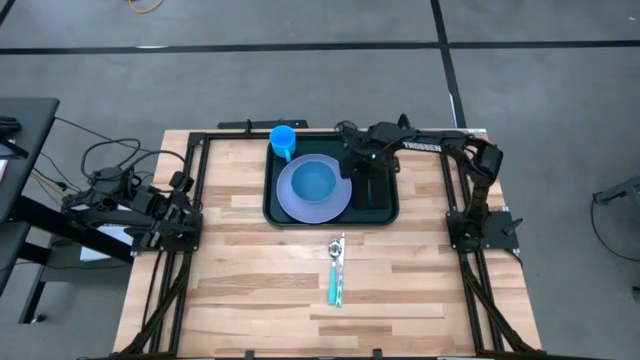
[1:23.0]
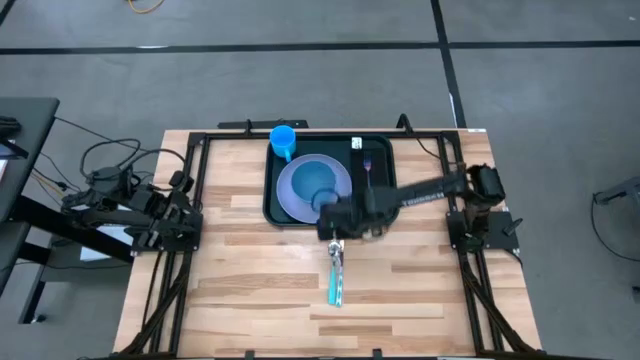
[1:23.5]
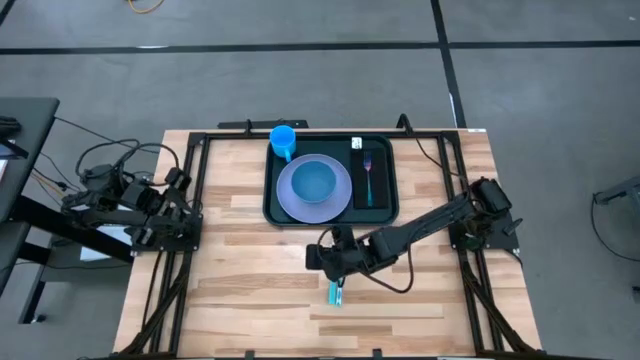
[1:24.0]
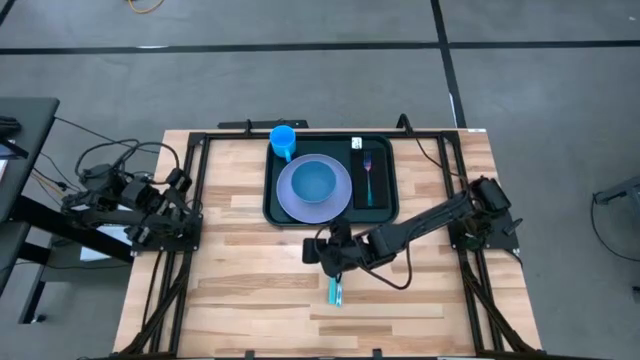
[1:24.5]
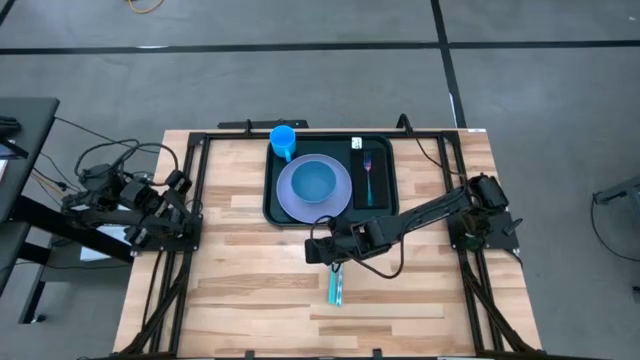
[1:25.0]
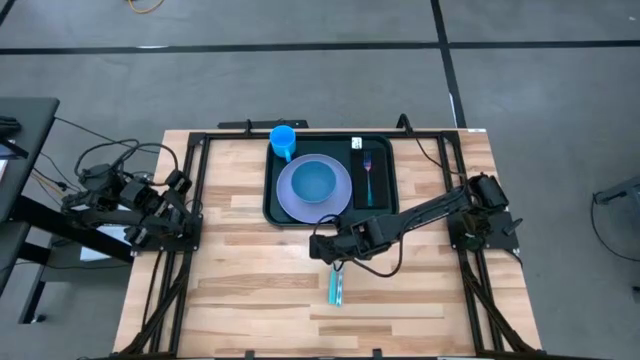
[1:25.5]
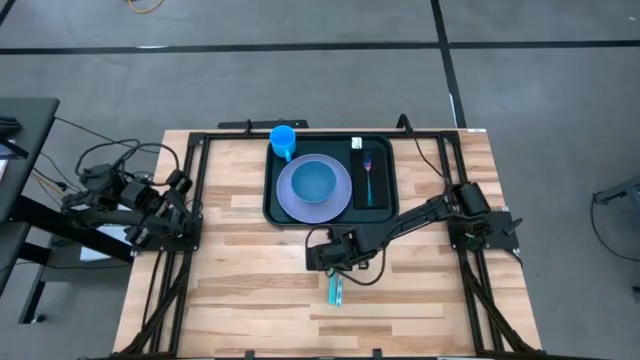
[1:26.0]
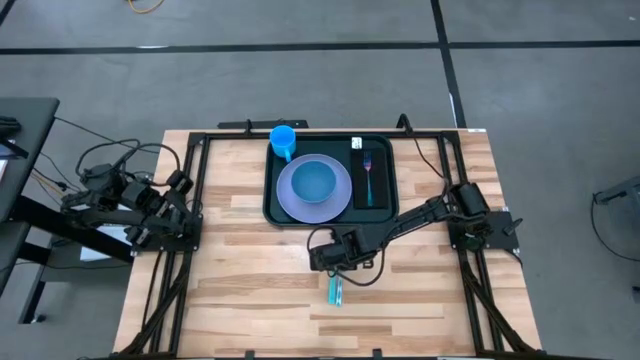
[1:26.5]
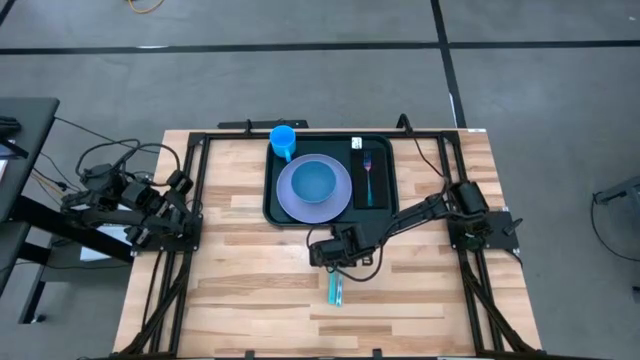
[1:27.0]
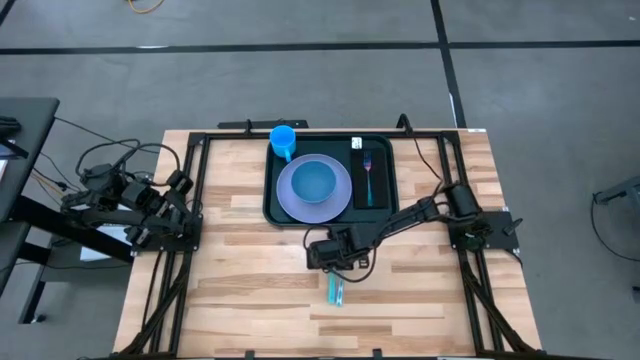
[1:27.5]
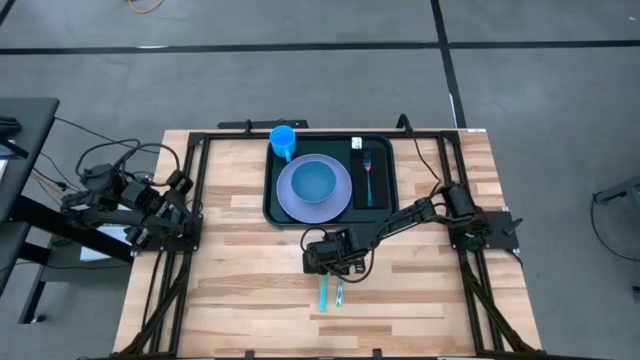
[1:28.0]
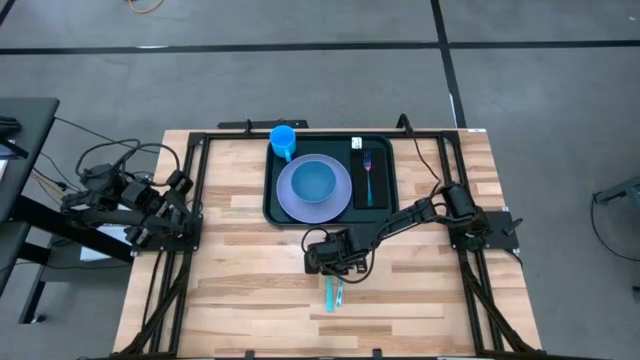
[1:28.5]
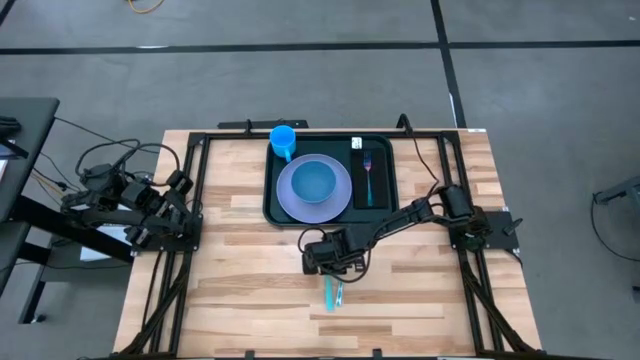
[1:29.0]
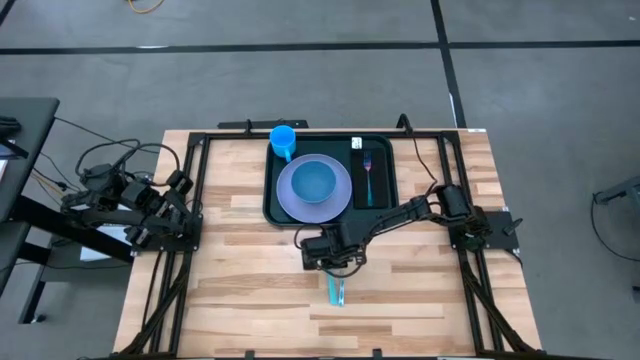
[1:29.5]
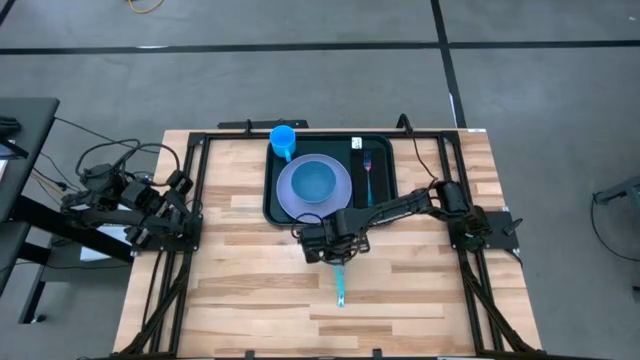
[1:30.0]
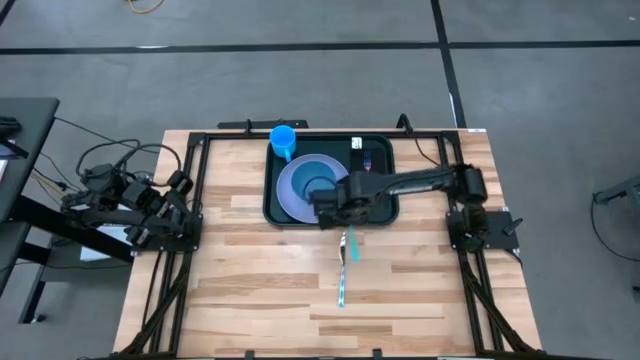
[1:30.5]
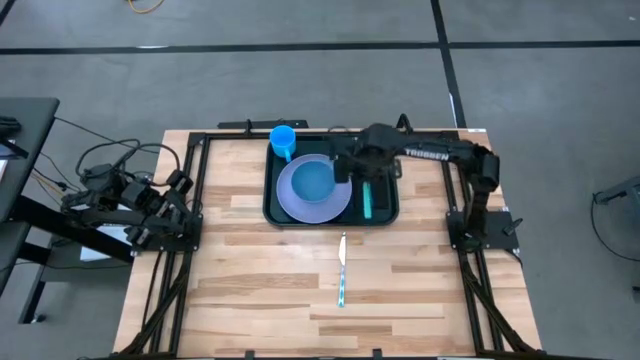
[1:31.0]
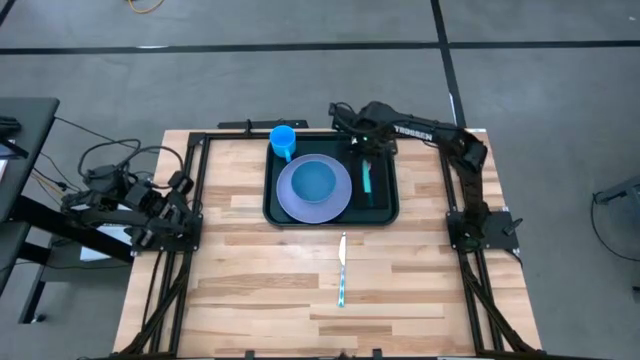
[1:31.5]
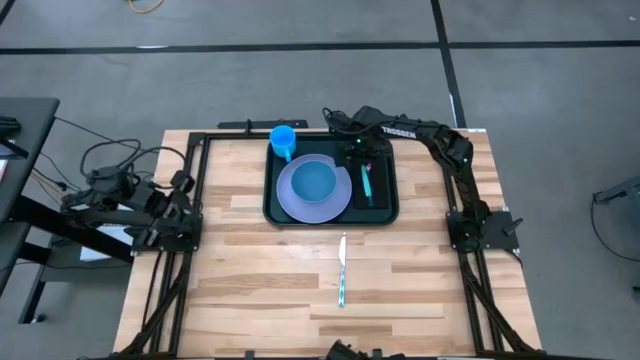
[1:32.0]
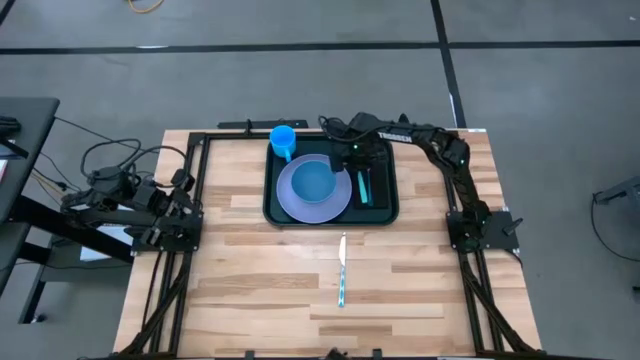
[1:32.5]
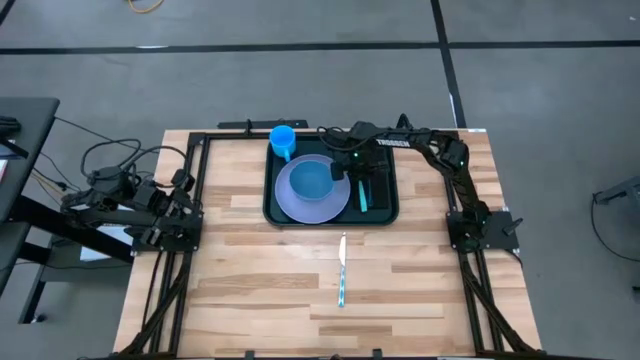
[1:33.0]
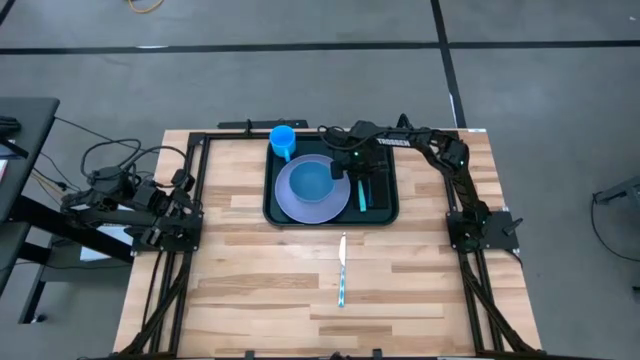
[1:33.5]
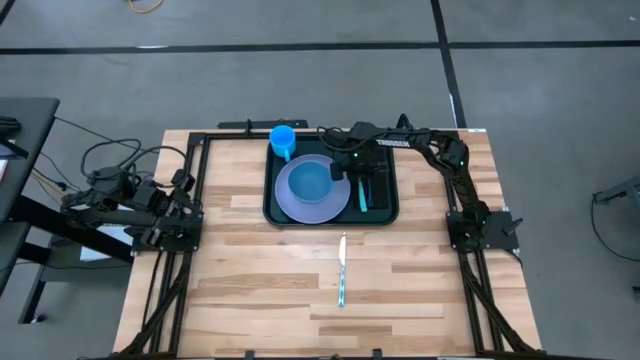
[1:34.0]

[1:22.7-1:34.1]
Task: Set up tray
Put the blue spoon on the black napkin to the left of the blue fork

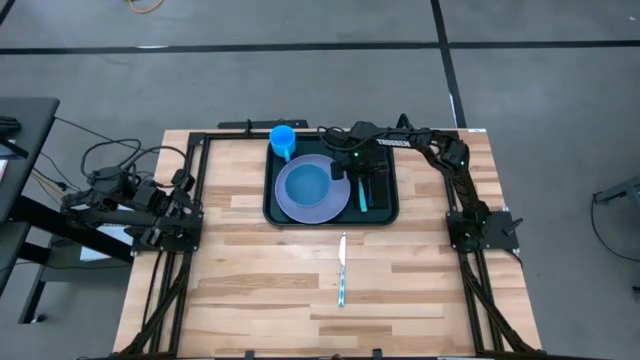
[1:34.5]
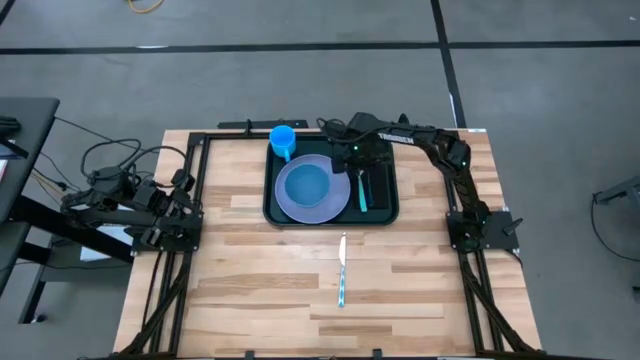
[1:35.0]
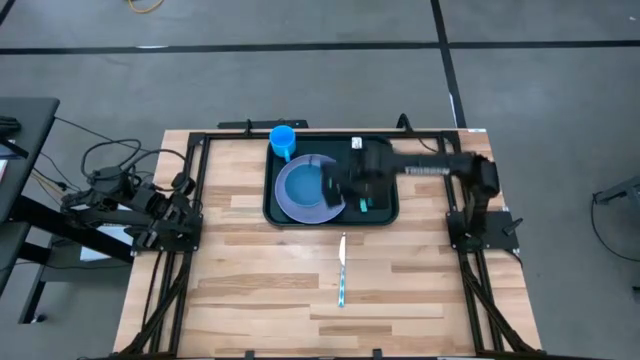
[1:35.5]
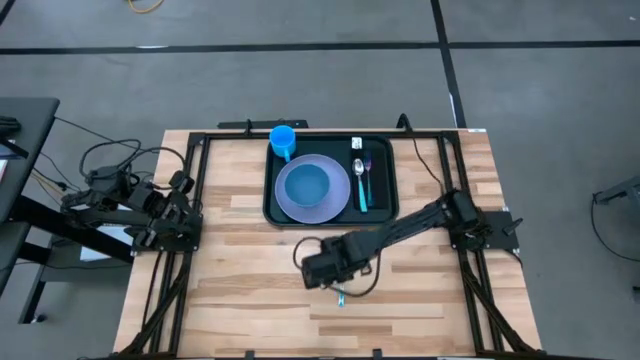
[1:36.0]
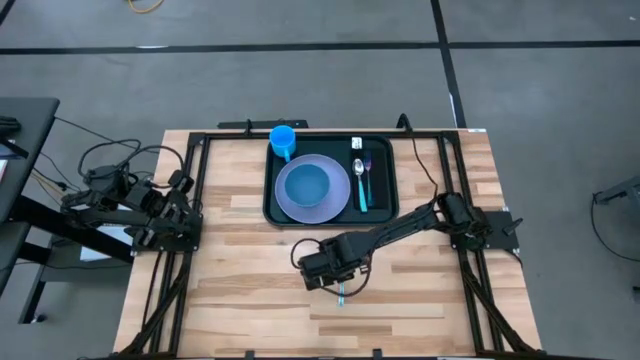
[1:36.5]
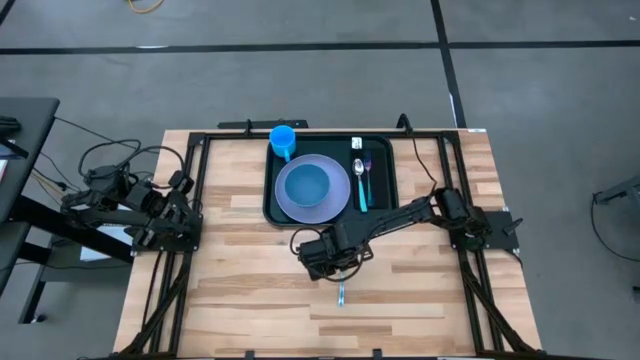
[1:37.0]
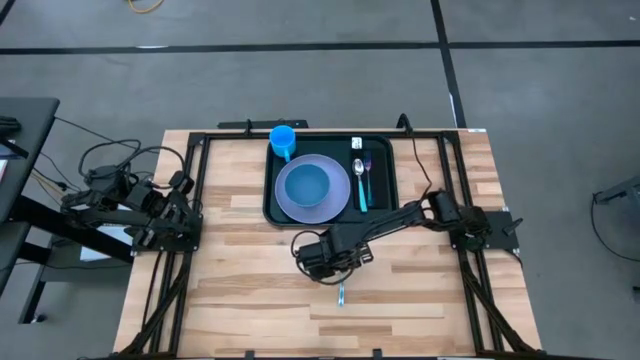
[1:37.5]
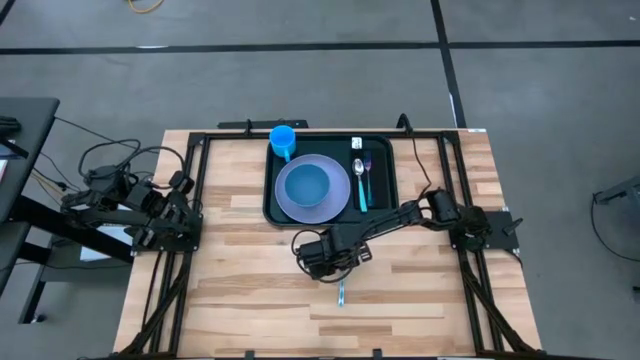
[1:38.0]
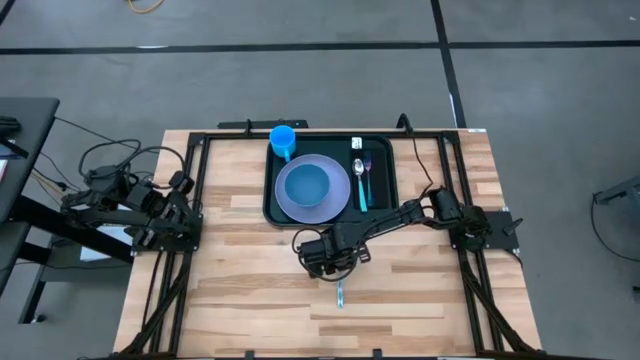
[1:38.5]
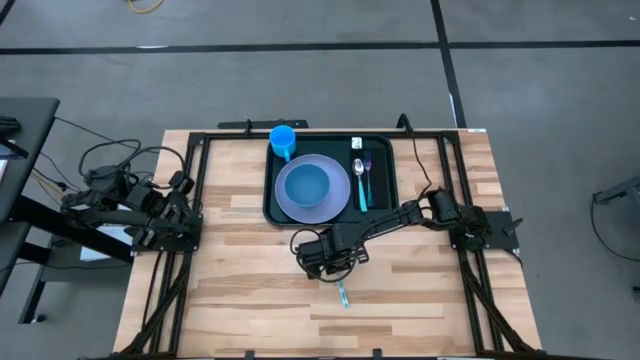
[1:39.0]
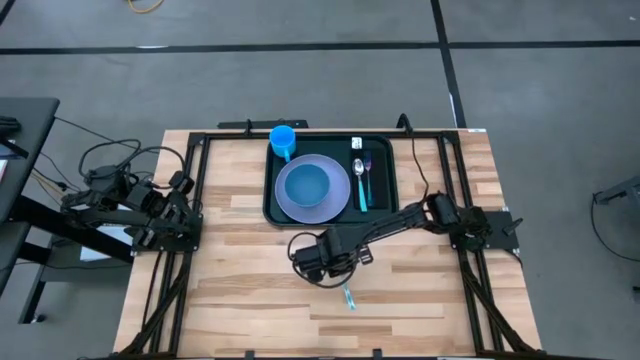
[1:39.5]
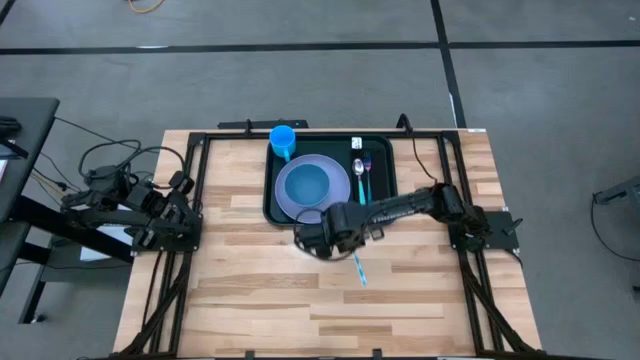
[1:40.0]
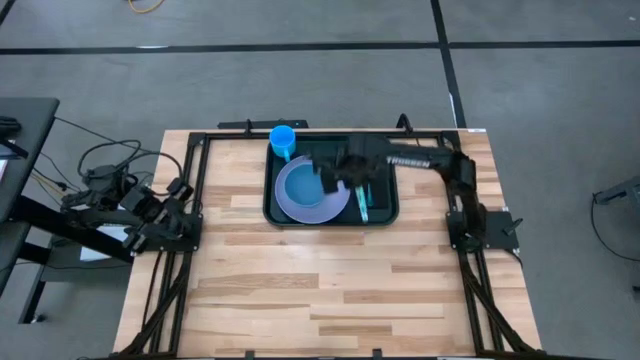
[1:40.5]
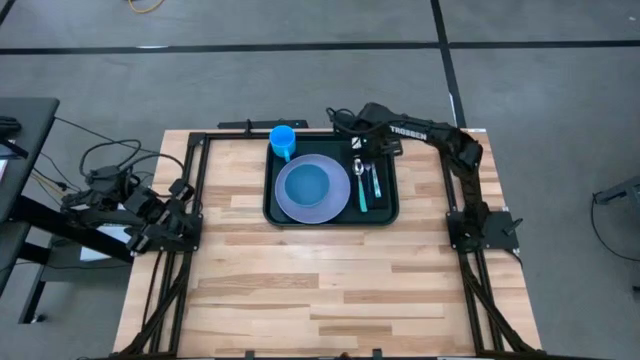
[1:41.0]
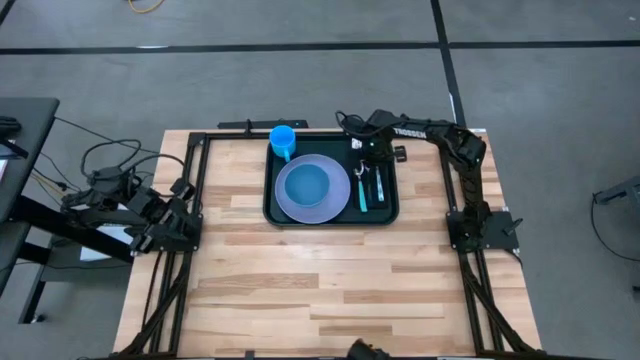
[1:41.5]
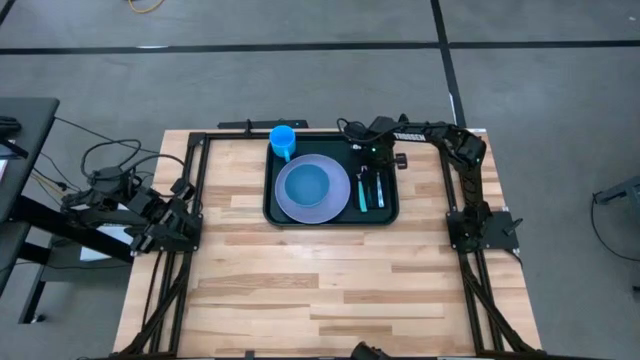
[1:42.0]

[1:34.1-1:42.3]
Put the green patterned knife on the black napkin to the right of the blue fork

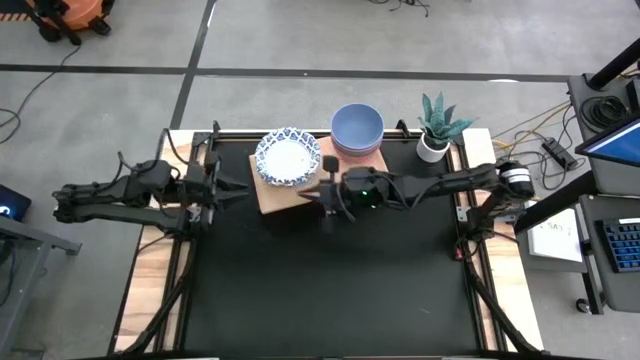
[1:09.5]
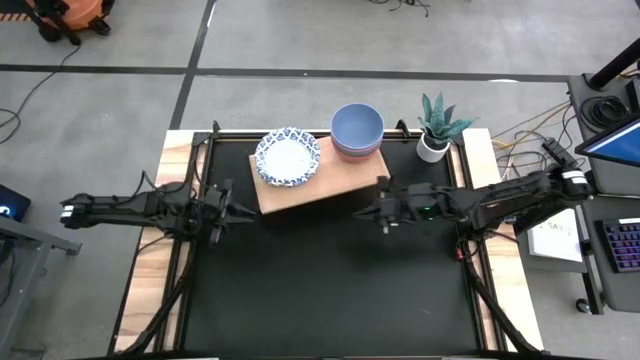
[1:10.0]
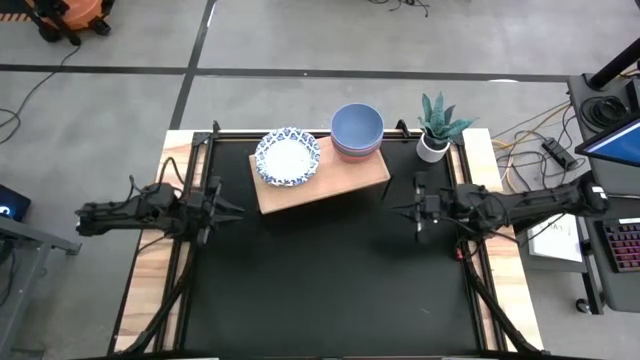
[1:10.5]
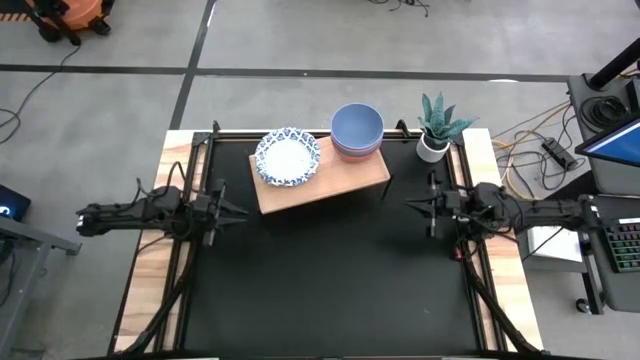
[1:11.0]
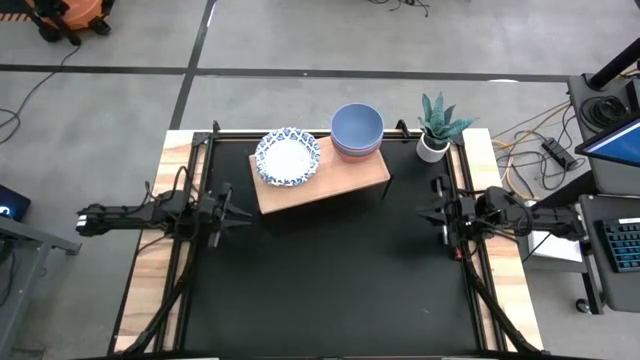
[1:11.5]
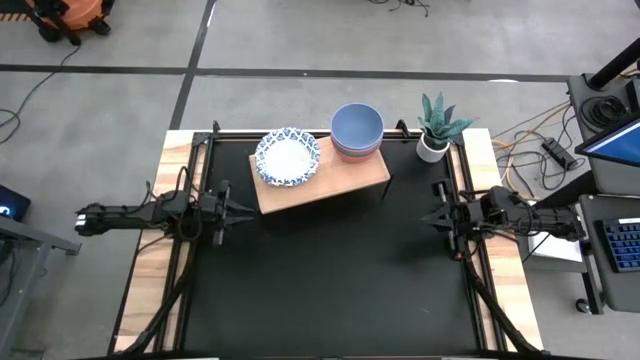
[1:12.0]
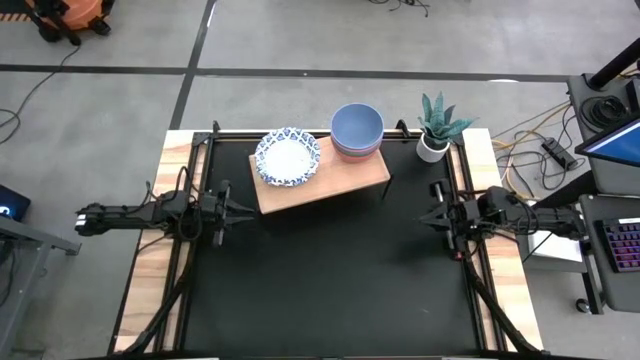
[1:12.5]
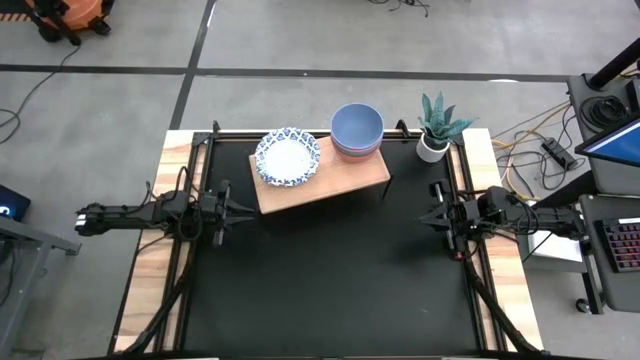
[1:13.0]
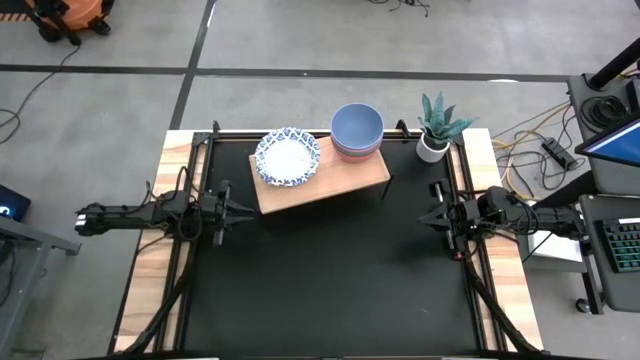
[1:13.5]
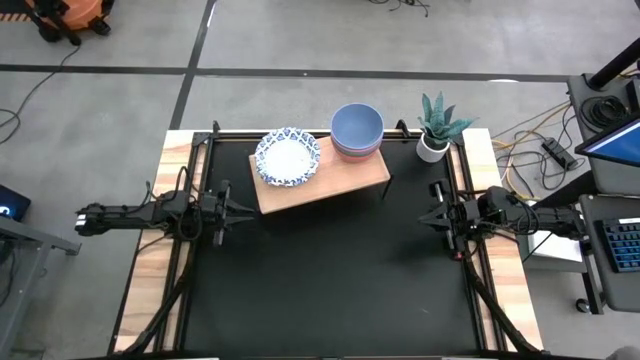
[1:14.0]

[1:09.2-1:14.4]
Task: Place and stack bowls onto a shelf
Return to Home Position
